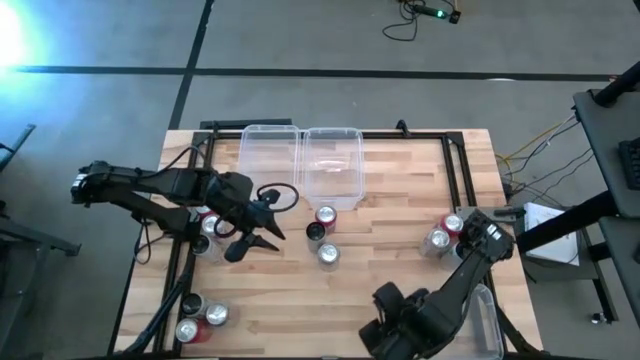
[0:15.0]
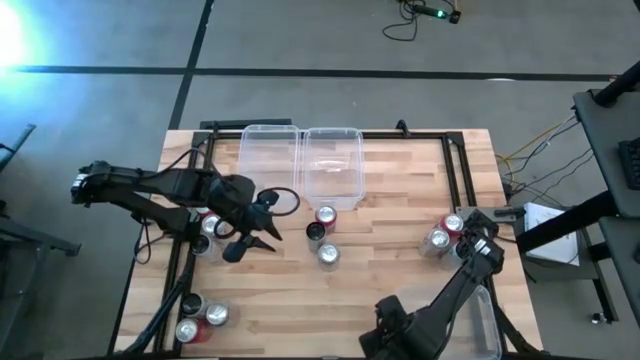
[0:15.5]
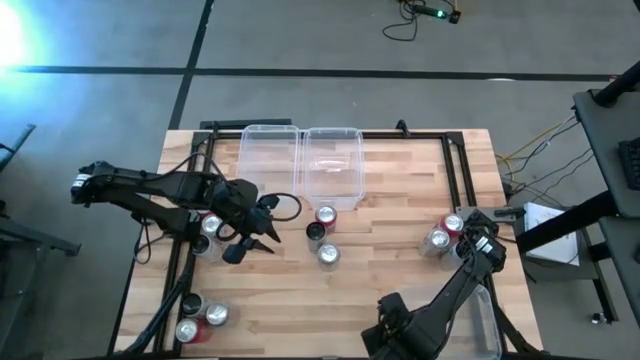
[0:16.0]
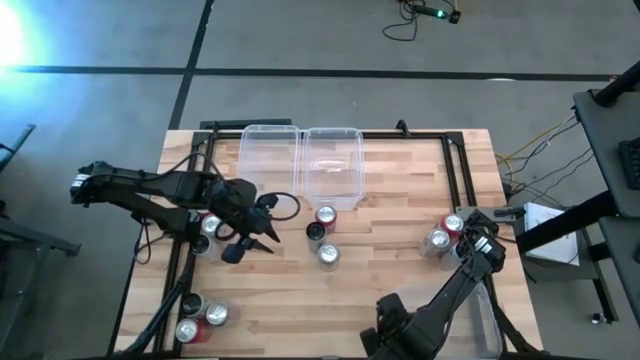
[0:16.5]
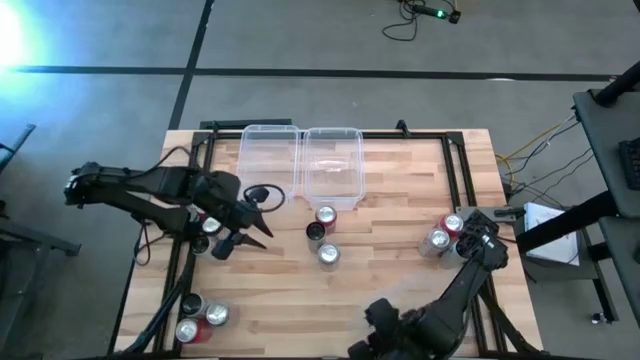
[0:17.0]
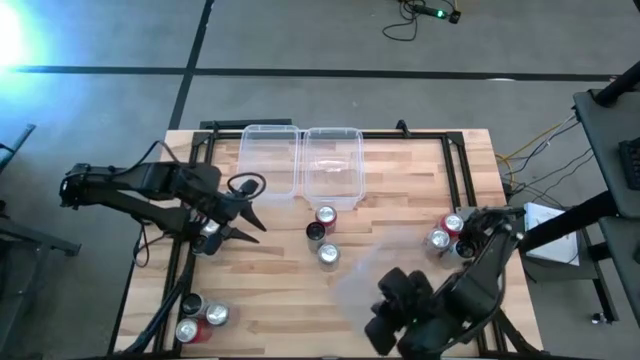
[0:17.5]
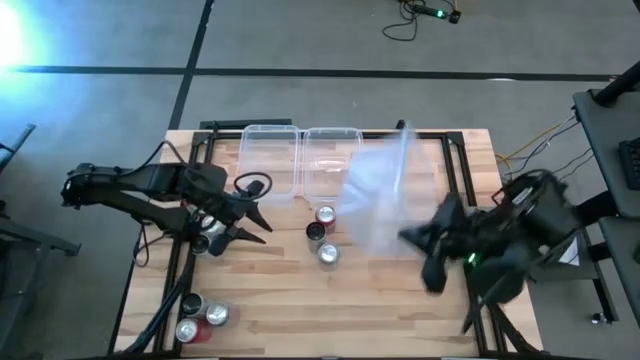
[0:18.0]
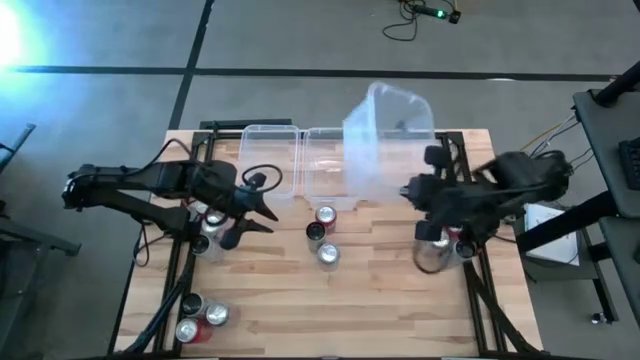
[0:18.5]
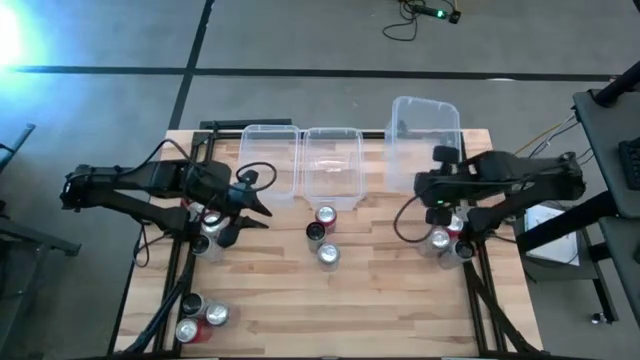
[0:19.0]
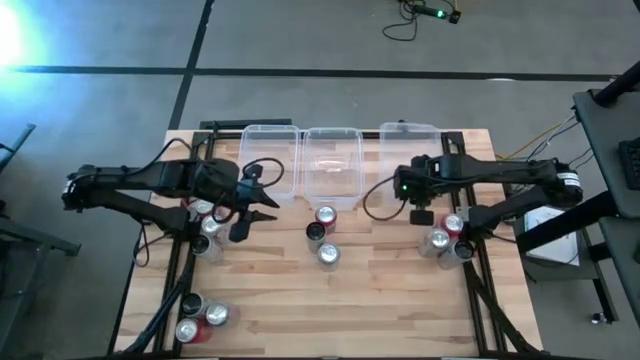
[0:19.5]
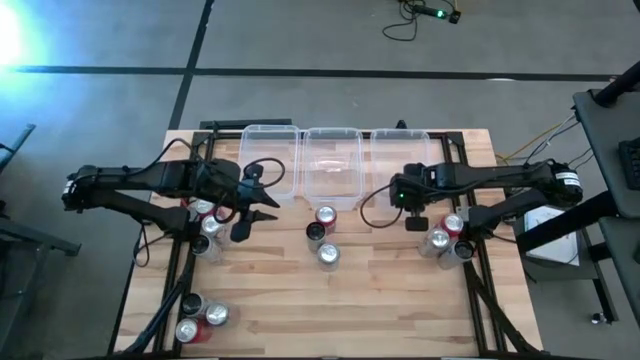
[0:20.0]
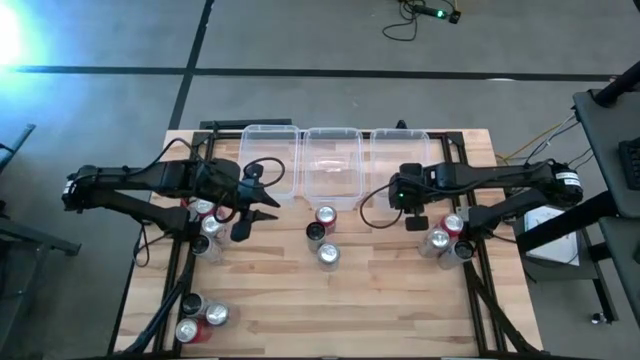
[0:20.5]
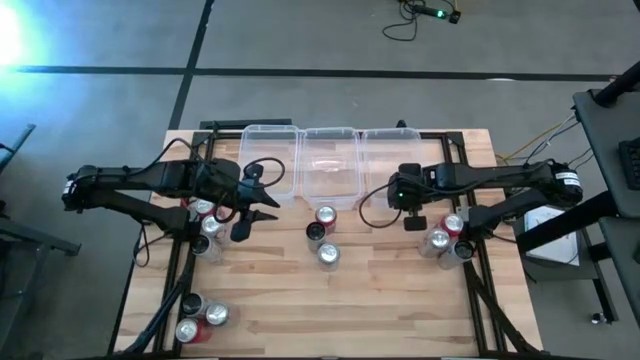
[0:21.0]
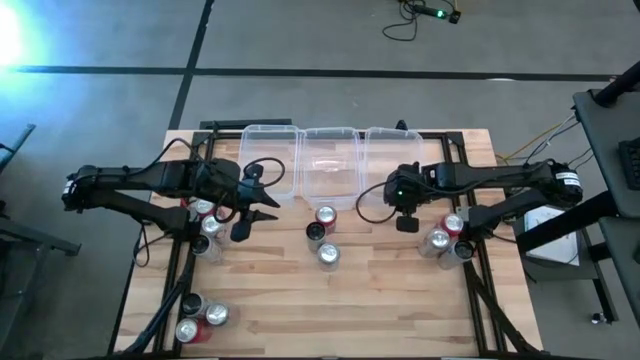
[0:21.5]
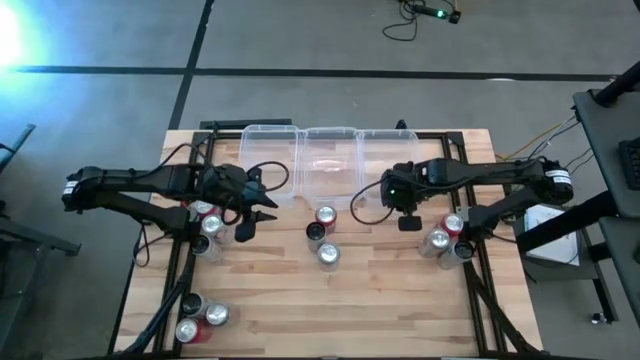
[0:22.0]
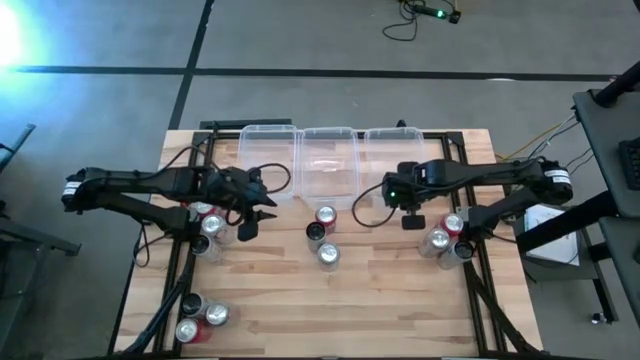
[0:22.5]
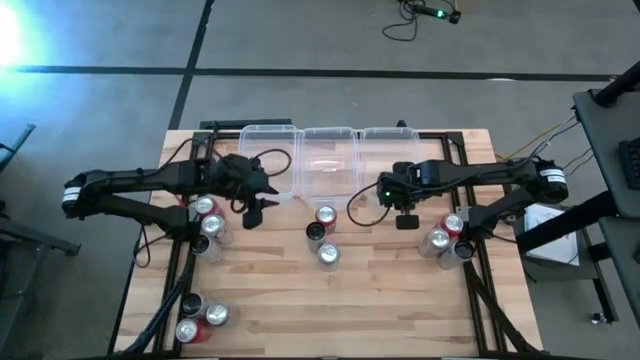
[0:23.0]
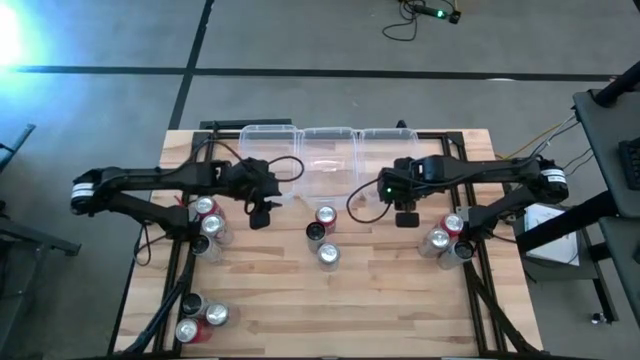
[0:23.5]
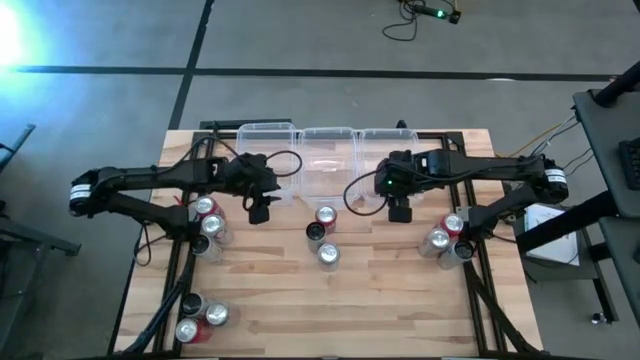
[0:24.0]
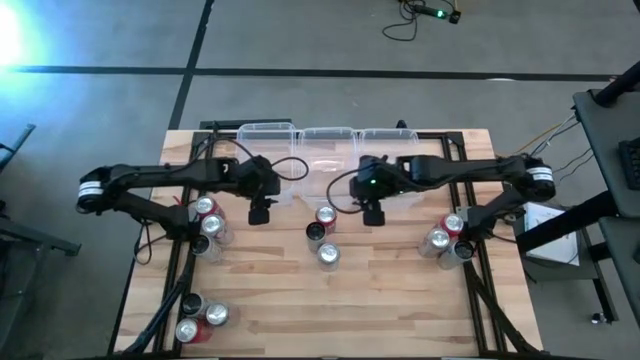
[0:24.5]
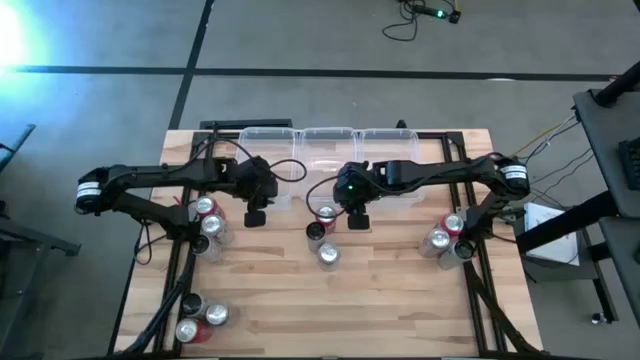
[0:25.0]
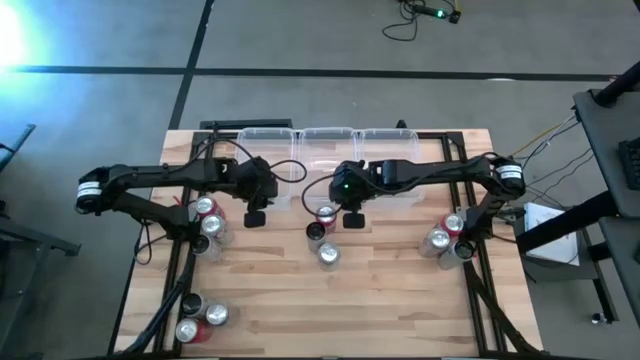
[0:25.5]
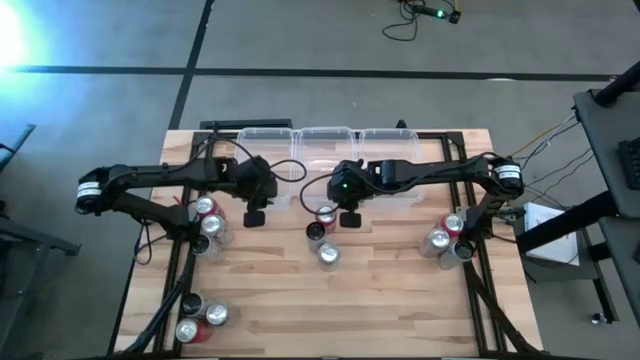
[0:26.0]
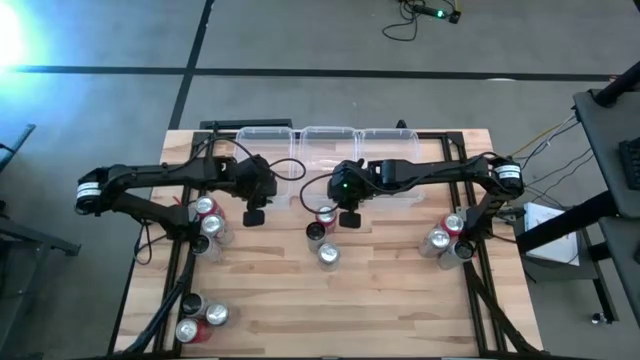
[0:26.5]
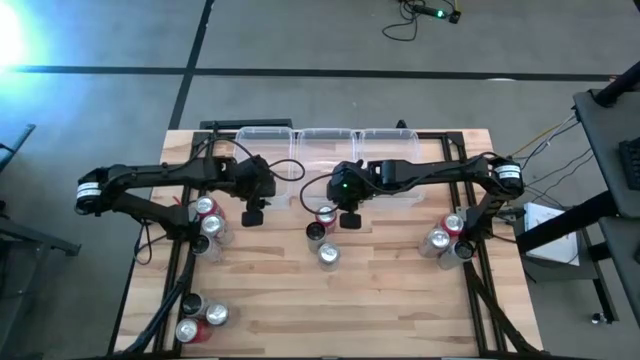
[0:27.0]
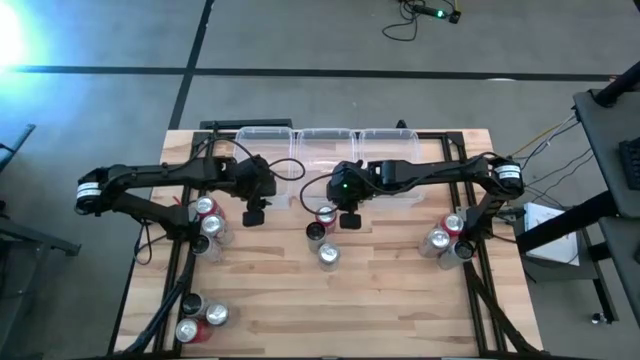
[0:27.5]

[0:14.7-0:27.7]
Task: Sort soda cans
Move the transparent bins to the top middle of the table

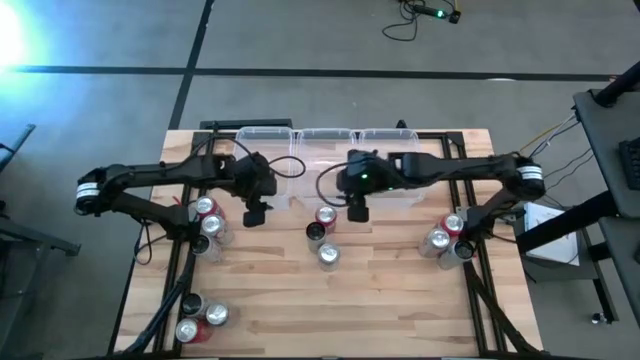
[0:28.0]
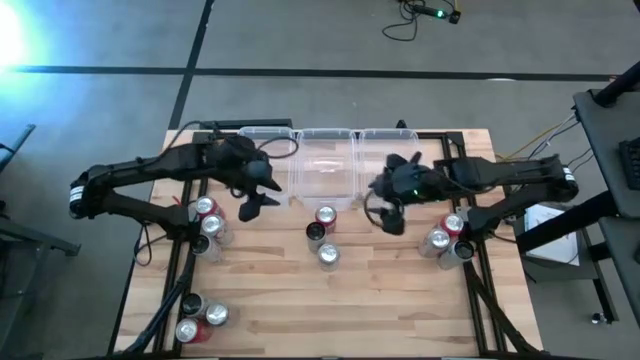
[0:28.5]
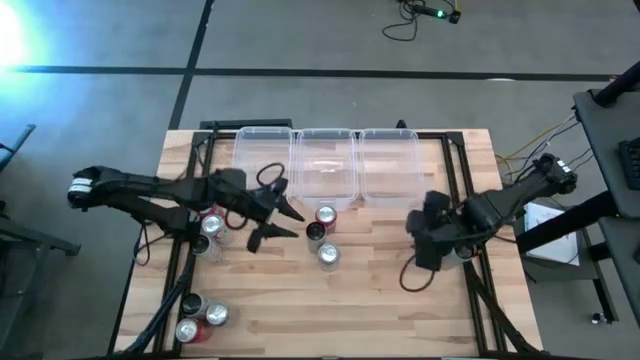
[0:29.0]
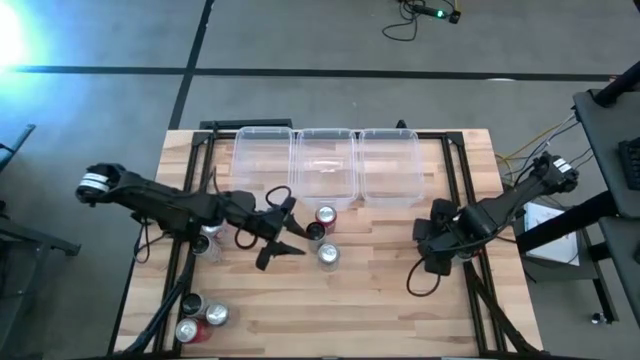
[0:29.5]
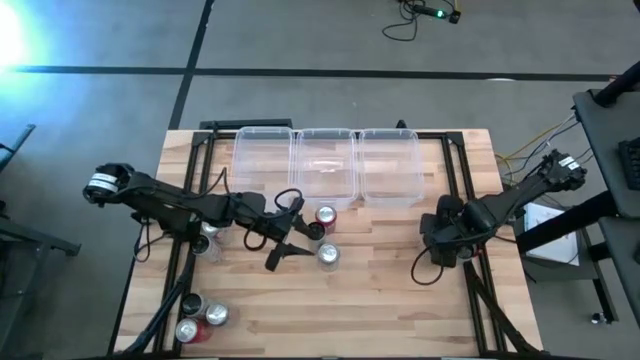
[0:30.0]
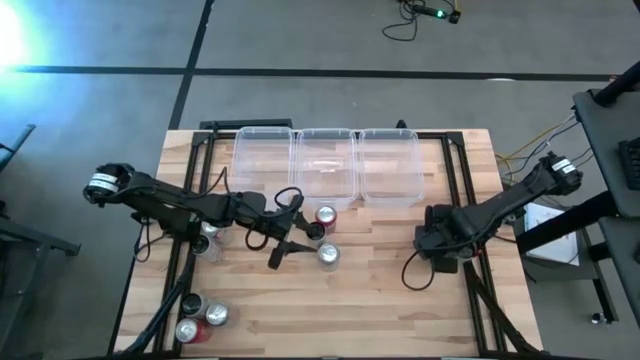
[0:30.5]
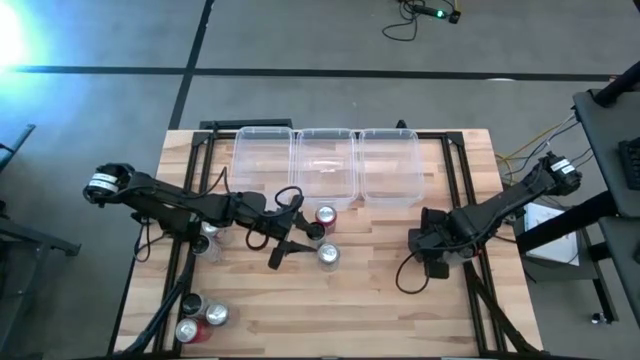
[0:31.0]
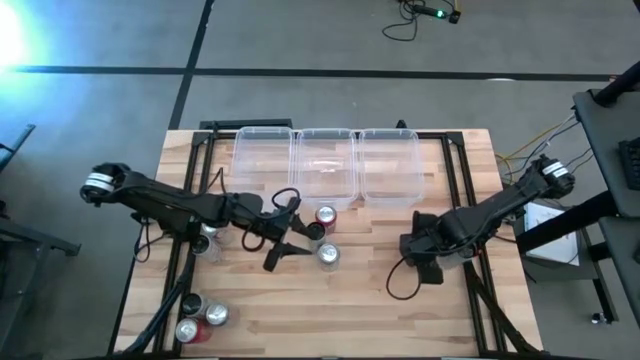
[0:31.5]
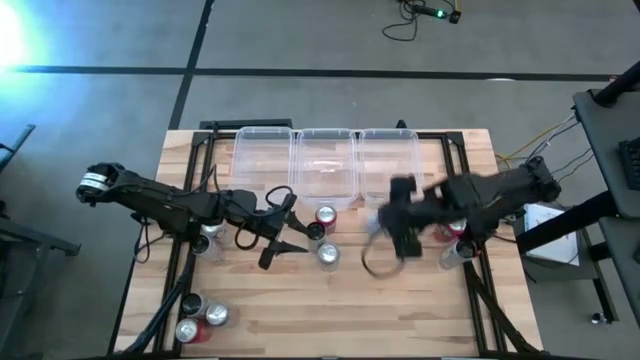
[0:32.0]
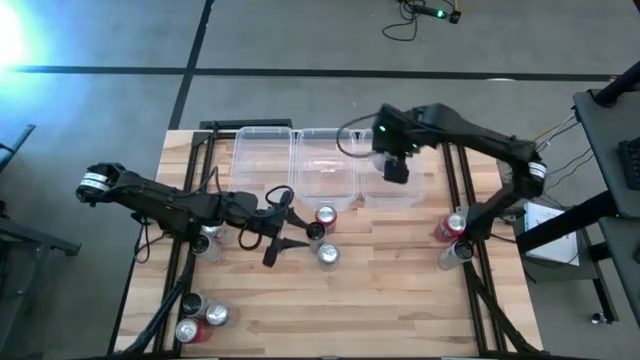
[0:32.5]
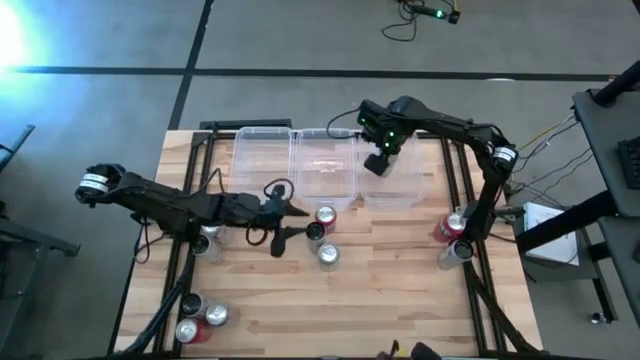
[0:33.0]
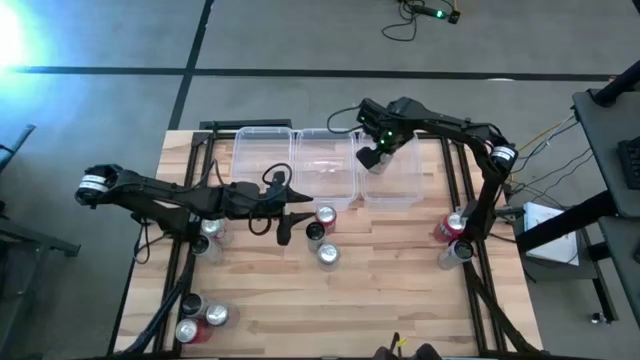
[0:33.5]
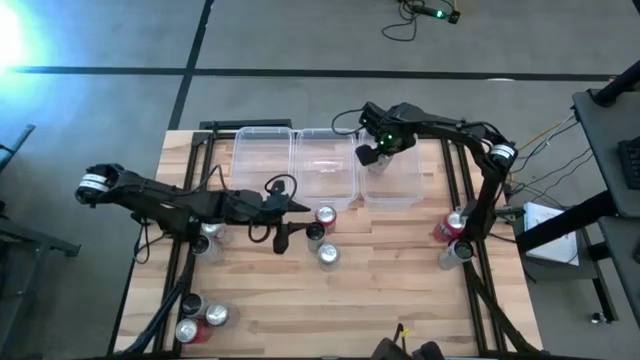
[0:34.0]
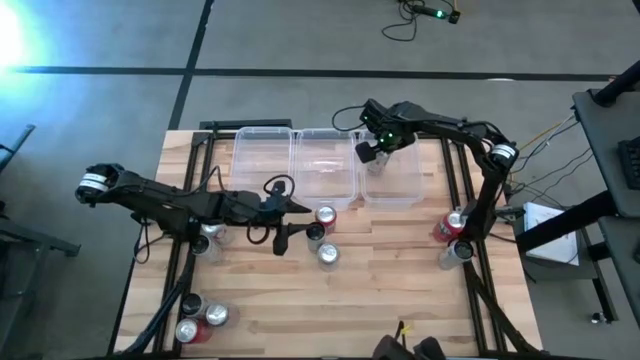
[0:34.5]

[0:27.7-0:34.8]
Put the top right red silver soda can into the right transparent bin

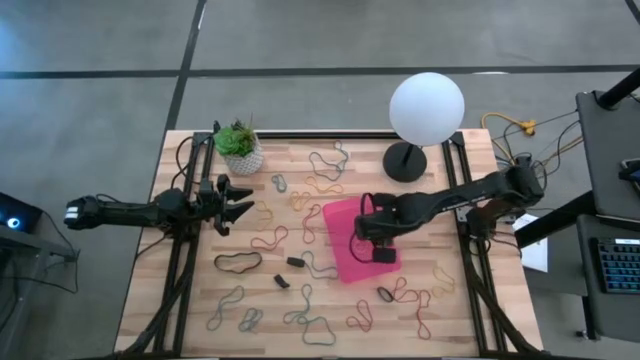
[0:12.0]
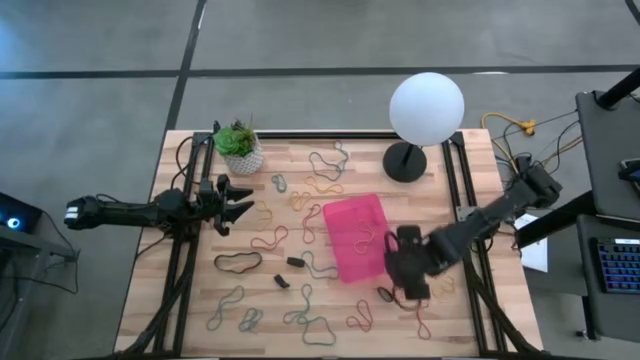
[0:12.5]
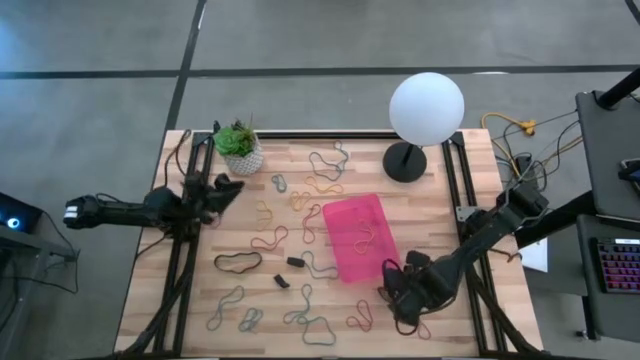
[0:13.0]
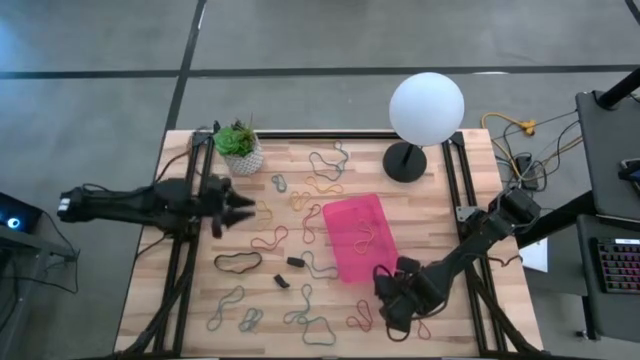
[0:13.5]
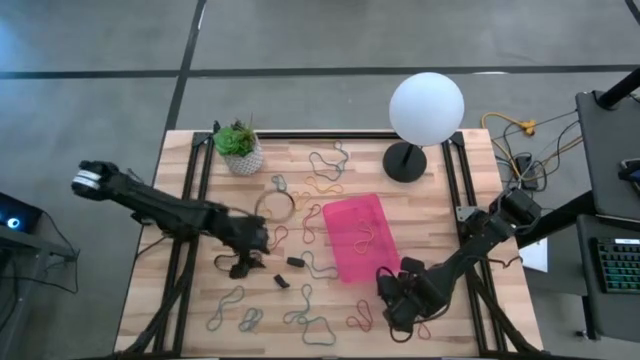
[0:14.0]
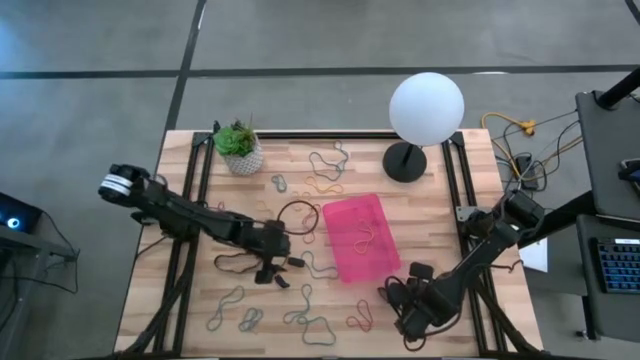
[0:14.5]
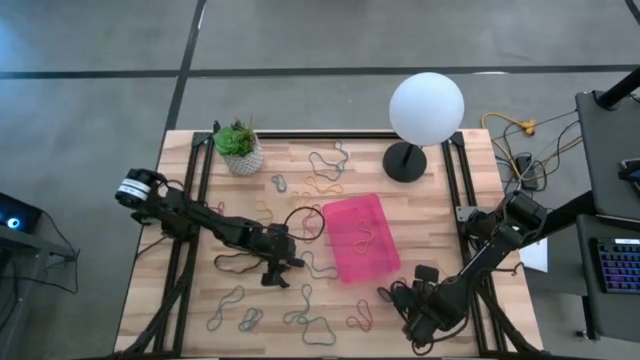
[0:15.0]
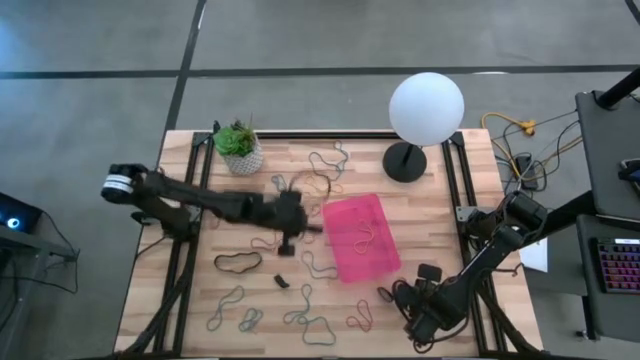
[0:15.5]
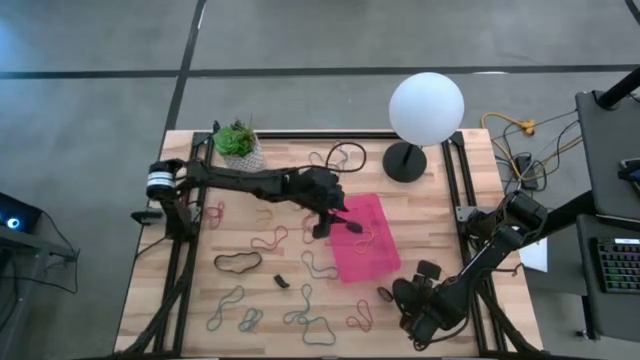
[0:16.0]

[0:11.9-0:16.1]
Task: Pick and place rubber bands into bin
Put the black rubber band into the pink bin
